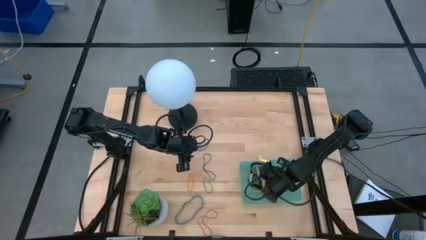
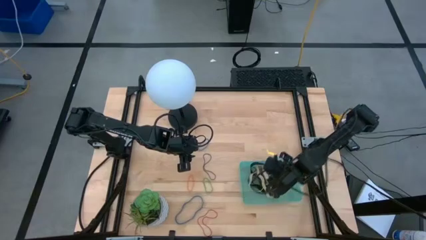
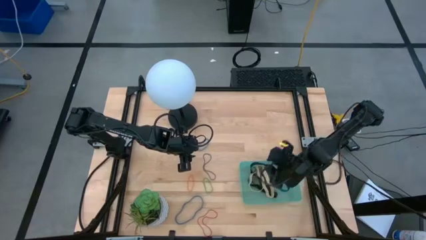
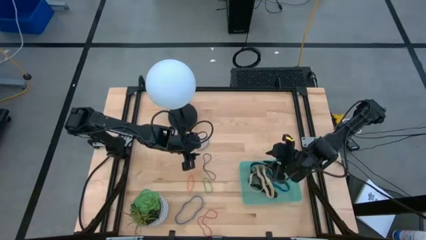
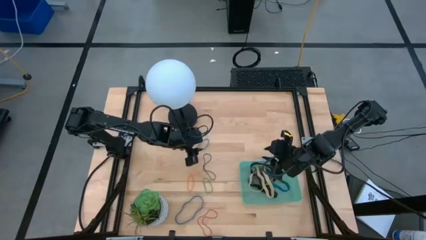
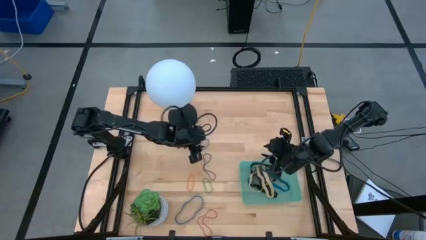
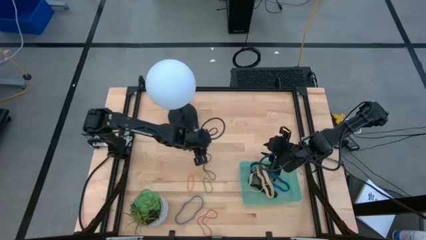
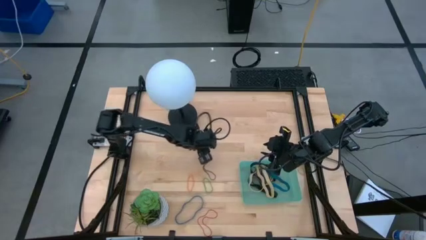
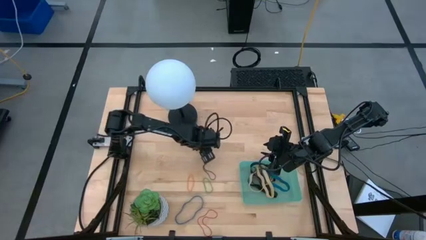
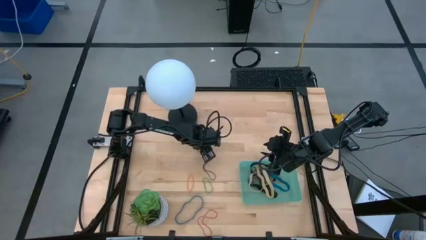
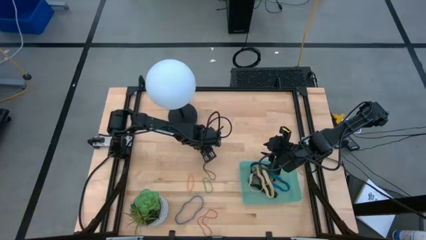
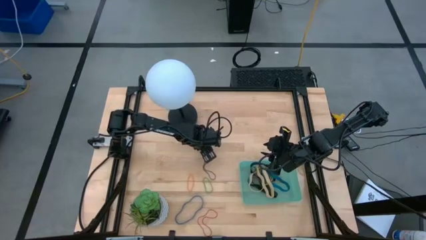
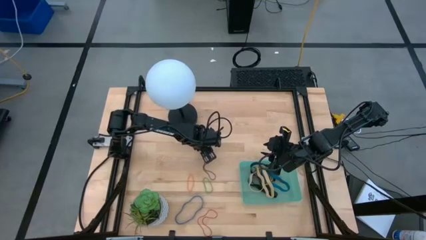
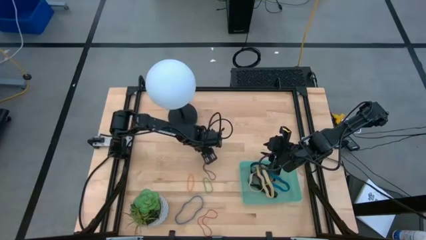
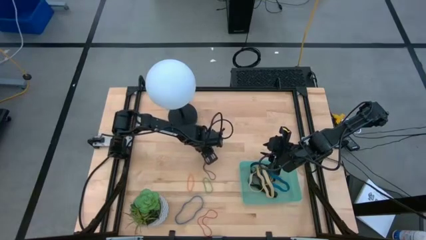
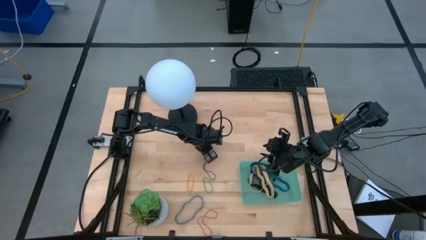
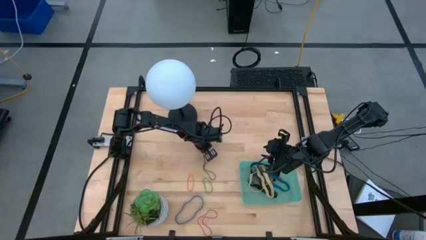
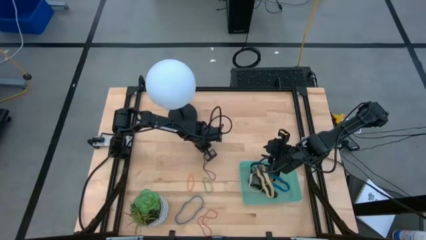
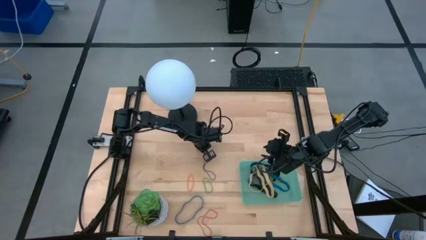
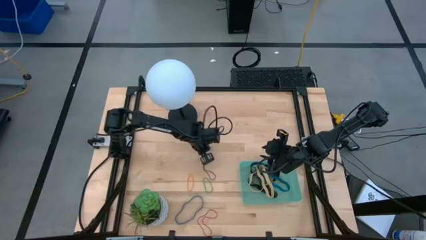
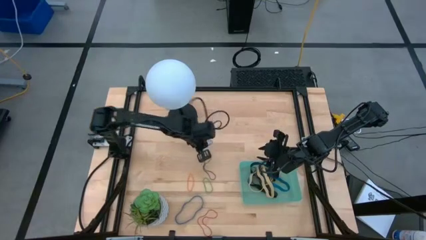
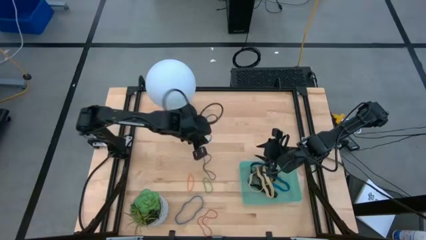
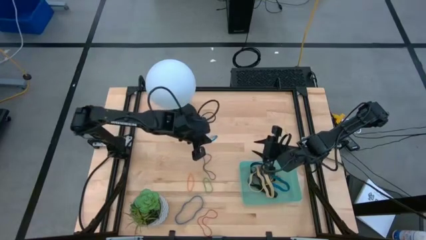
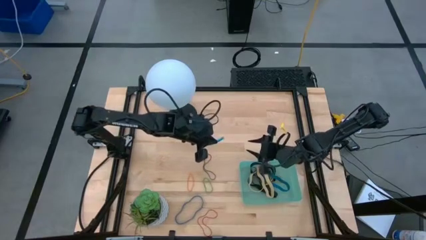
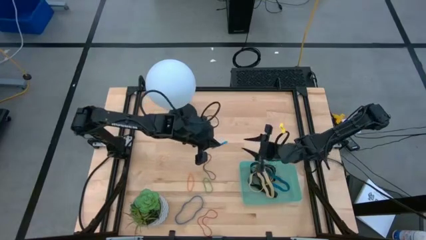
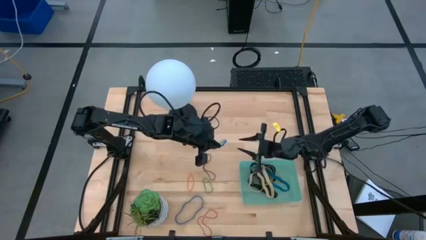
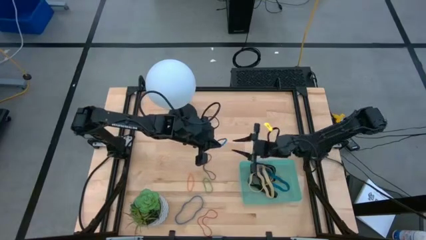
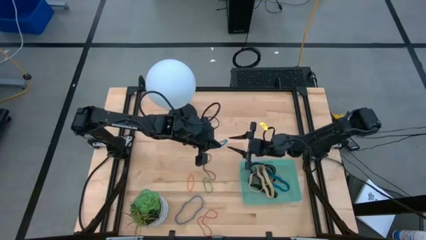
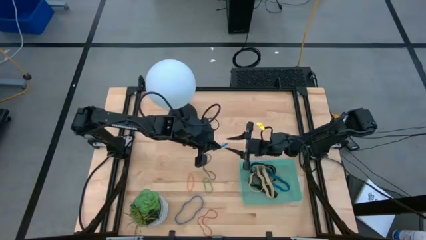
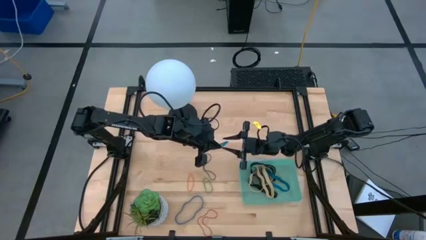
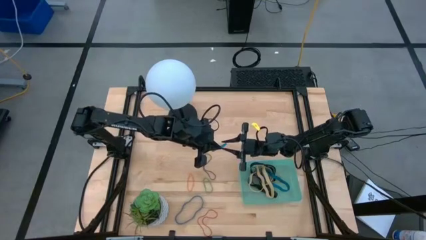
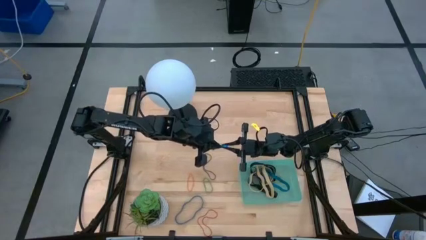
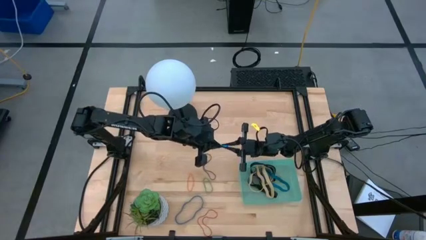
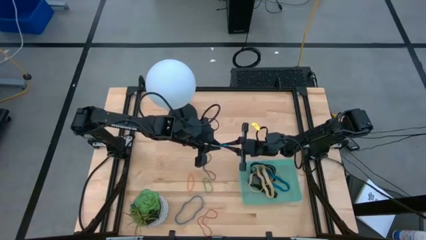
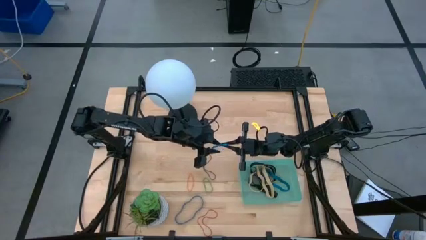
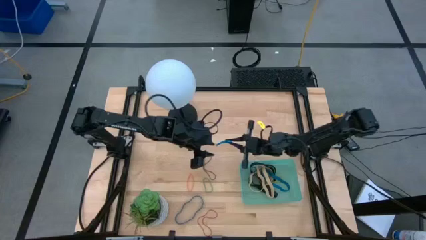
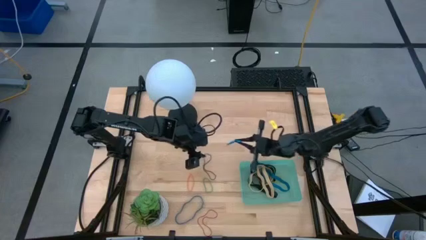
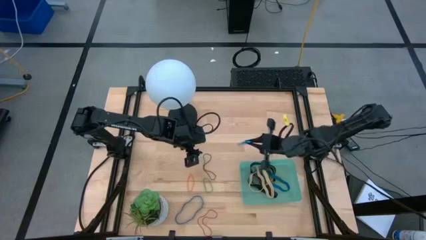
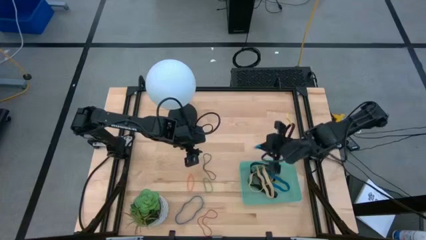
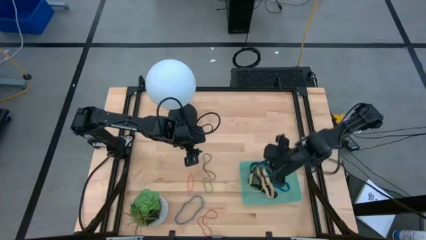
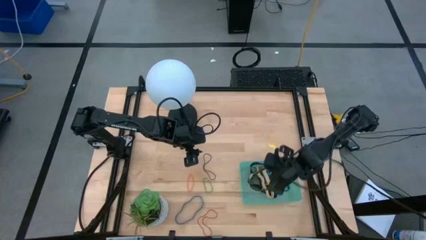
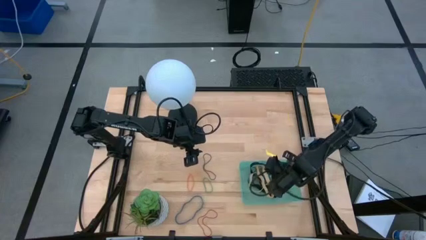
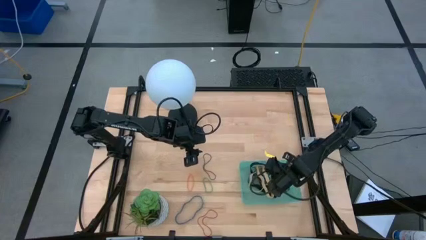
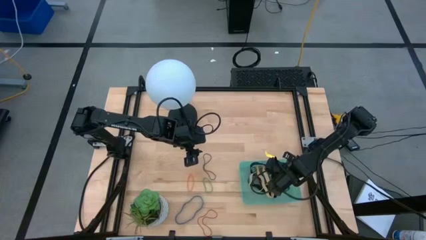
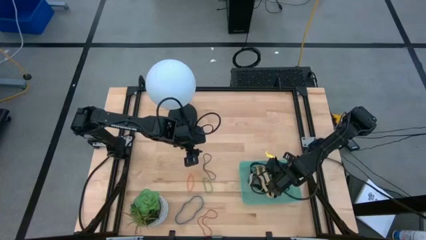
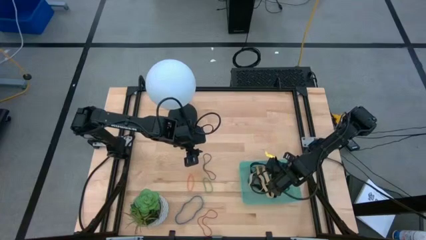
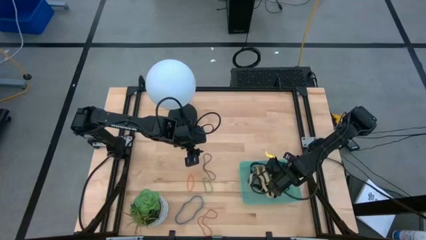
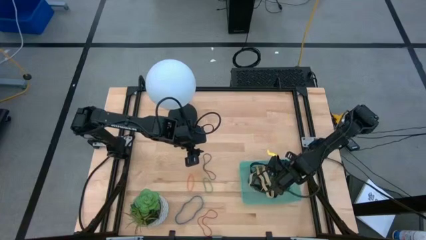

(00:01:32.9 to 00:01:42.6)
Task: Pick and place rubber bands into bin
Put the top blue rubber band into the green bin

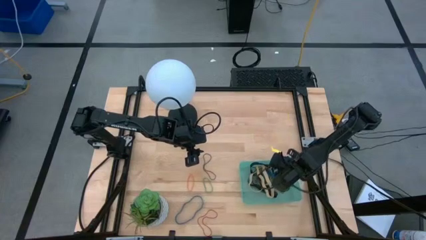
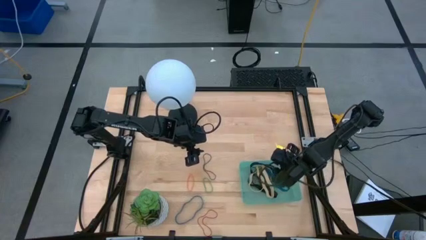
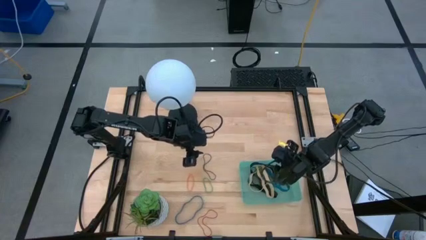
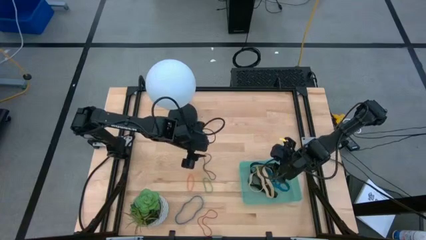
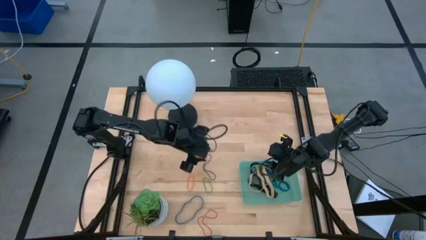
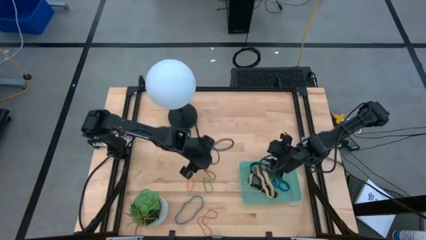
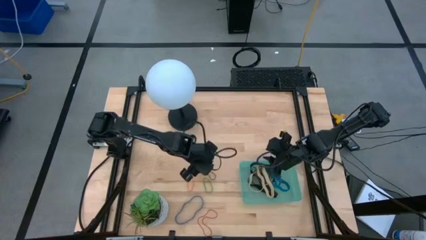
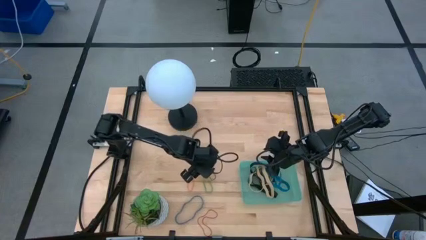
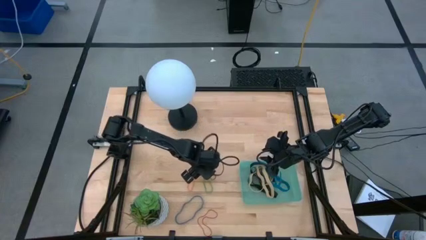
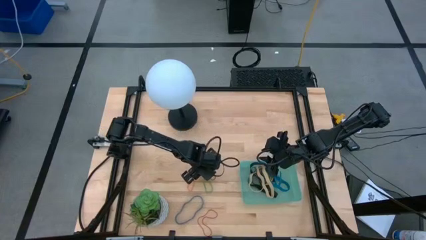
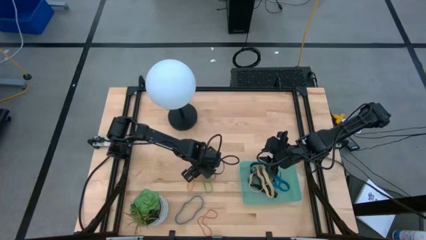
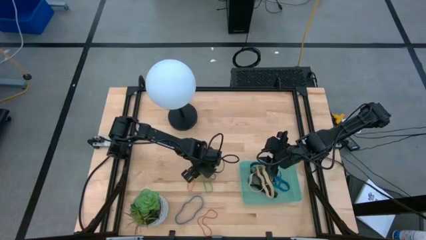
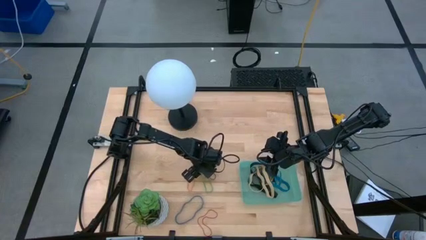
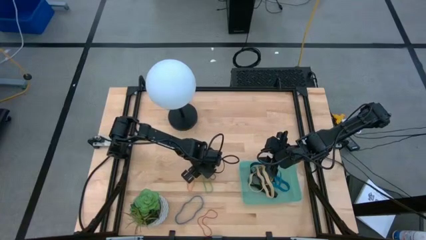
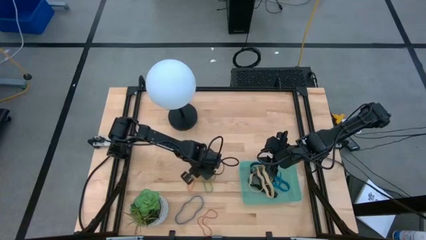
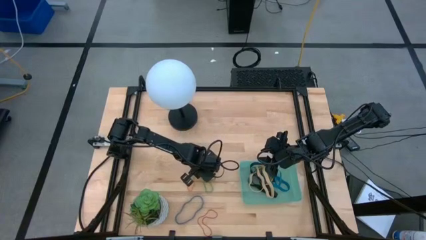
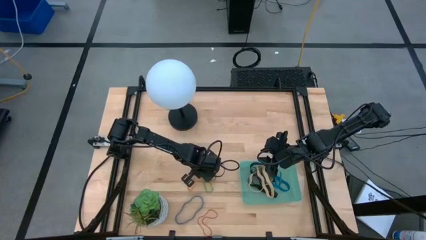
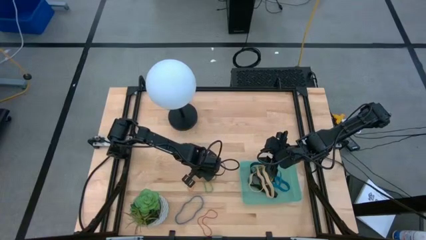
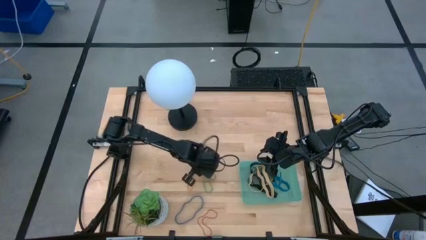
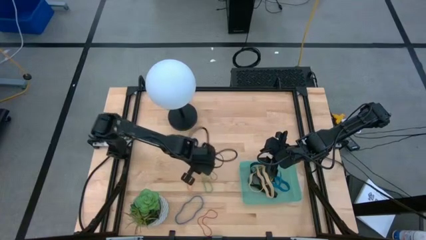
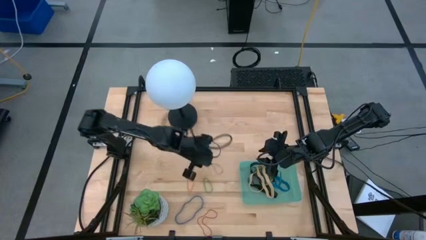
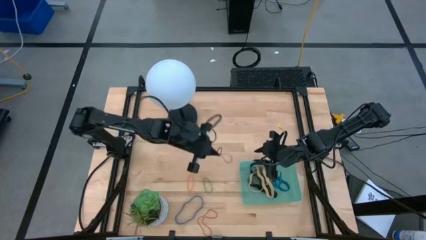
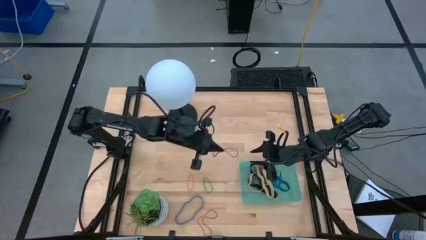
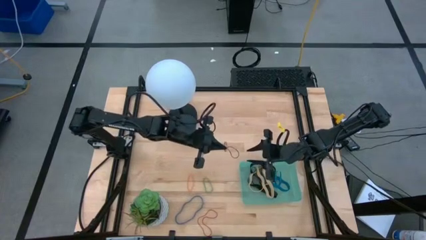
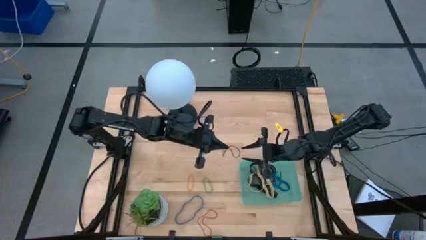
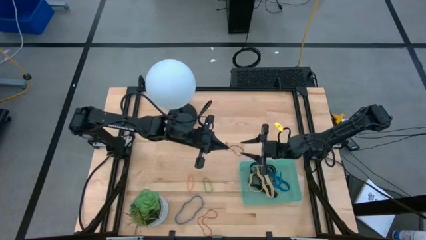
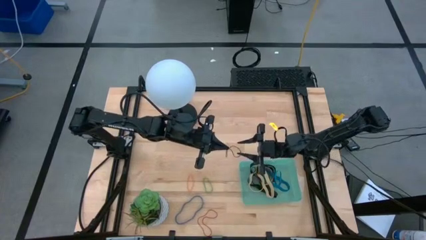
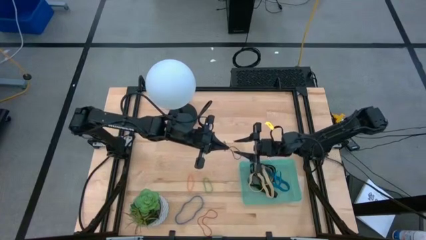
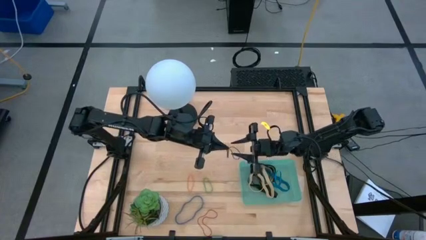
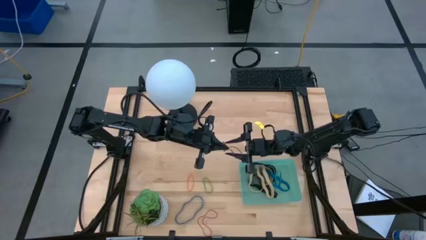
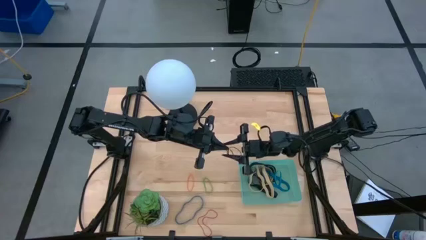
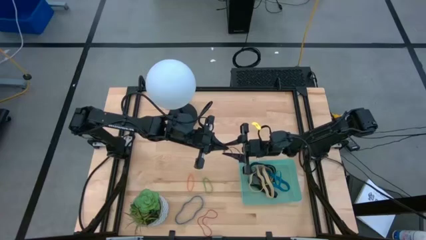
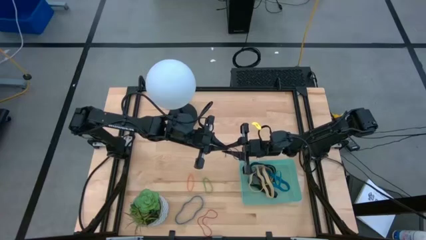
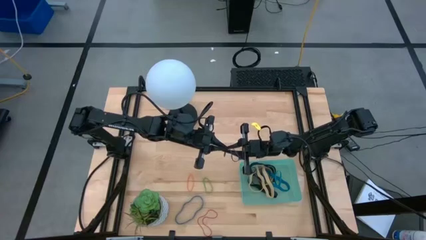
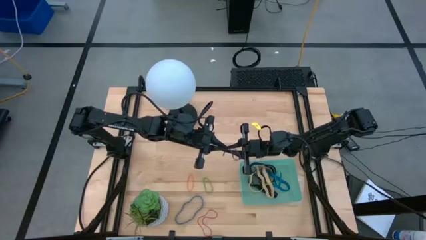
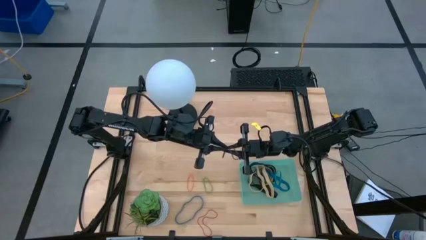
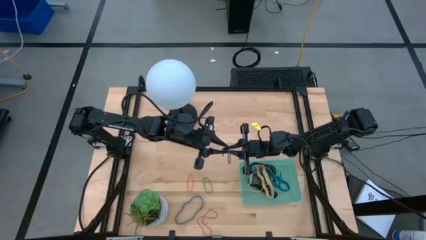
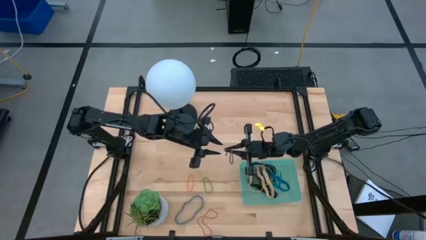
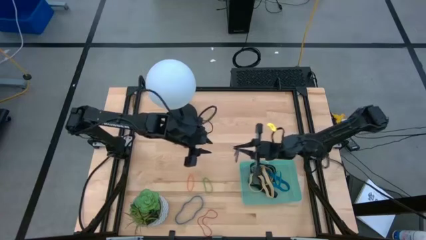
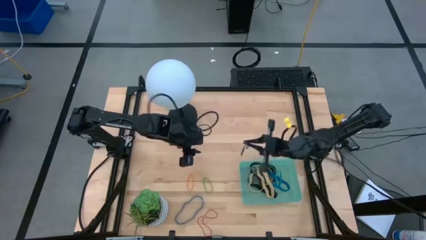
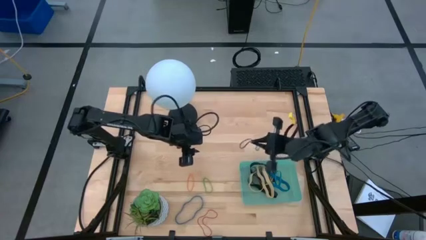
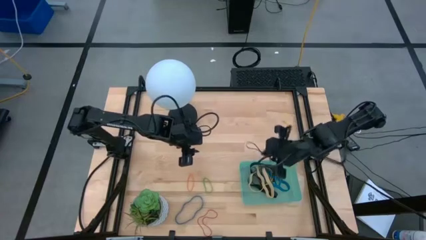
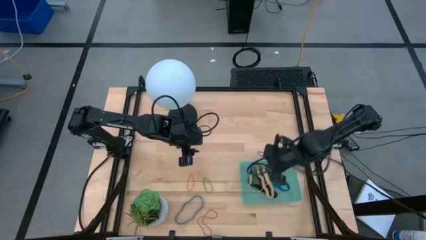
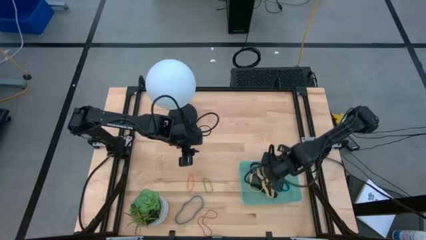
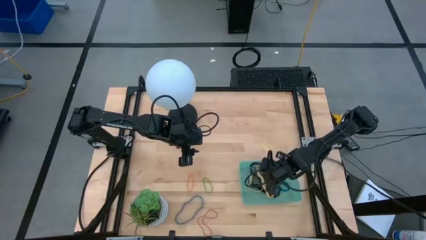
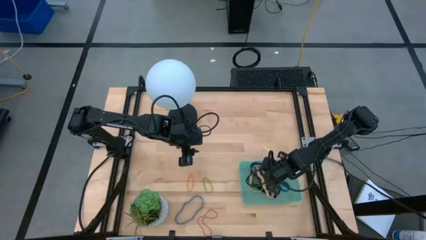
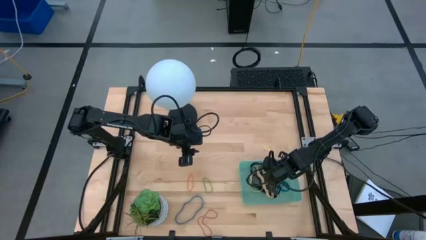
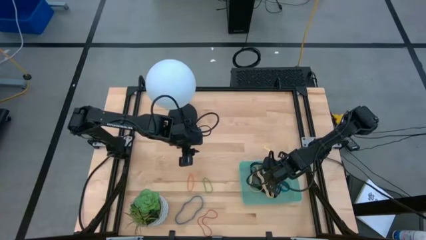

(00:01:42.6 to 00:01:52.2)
Put the purple rubber band into the green bin
